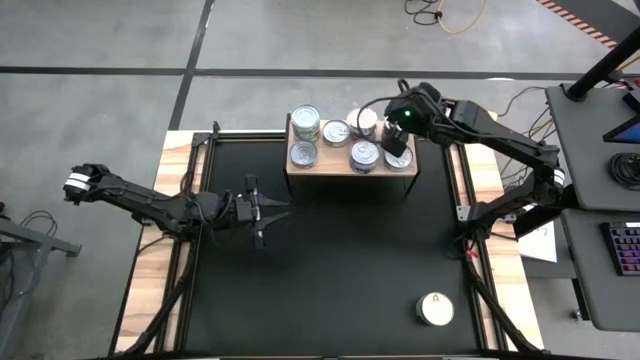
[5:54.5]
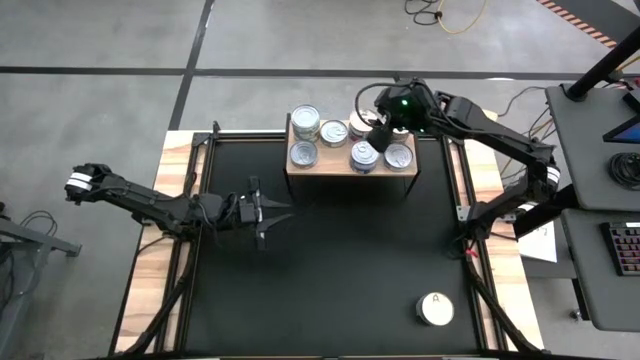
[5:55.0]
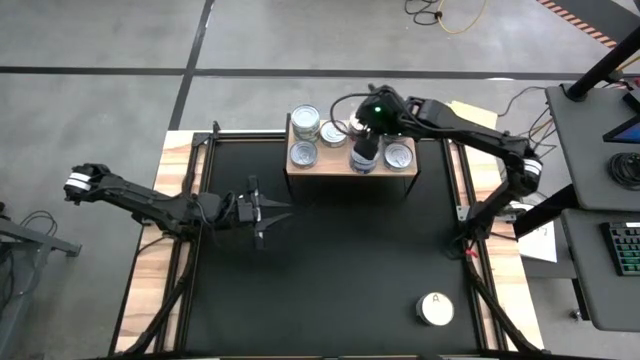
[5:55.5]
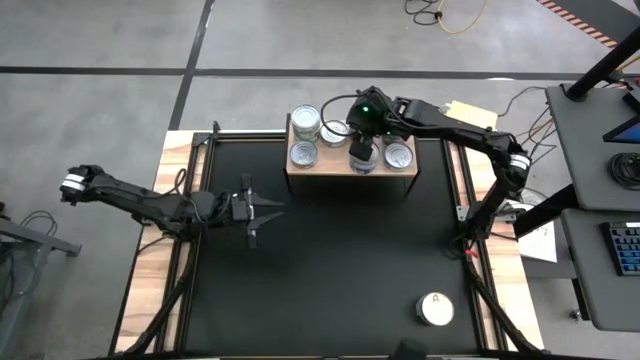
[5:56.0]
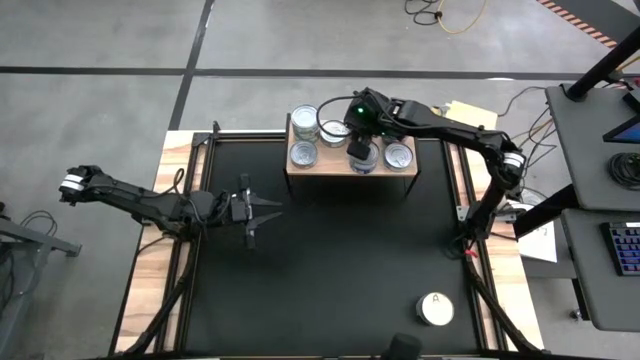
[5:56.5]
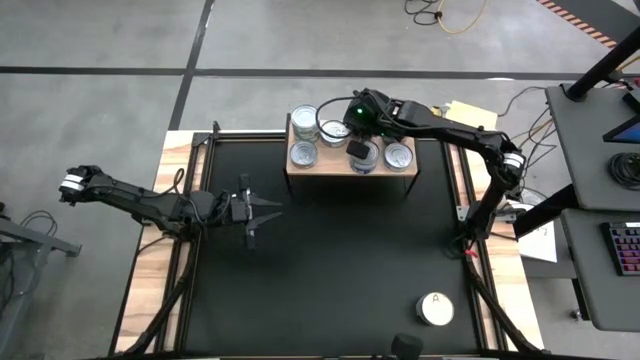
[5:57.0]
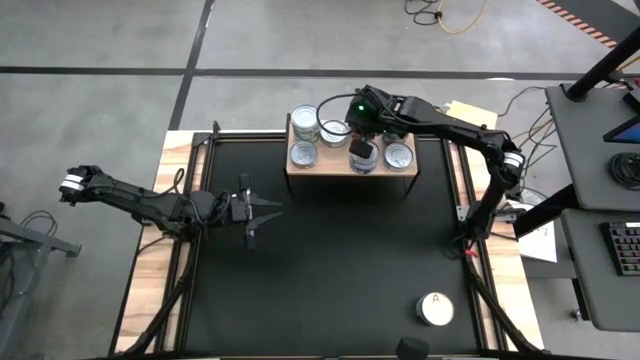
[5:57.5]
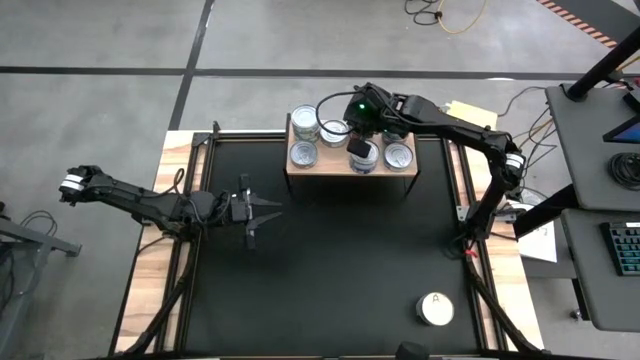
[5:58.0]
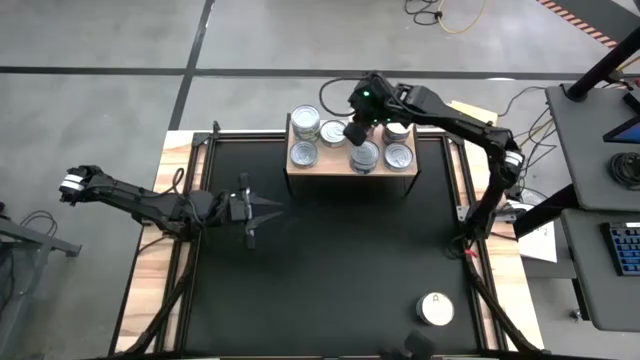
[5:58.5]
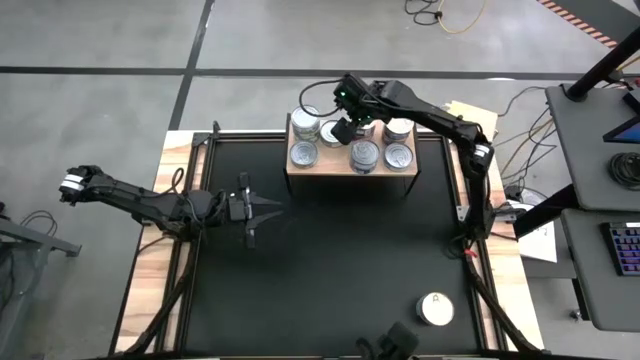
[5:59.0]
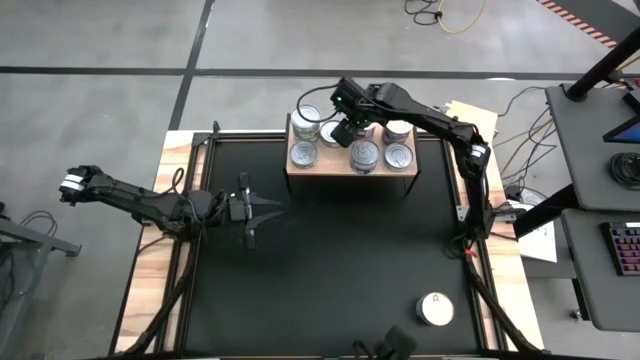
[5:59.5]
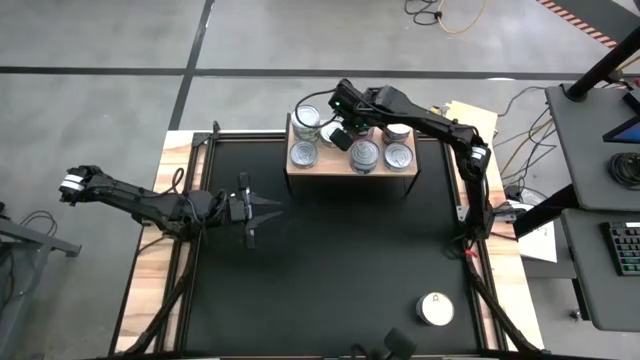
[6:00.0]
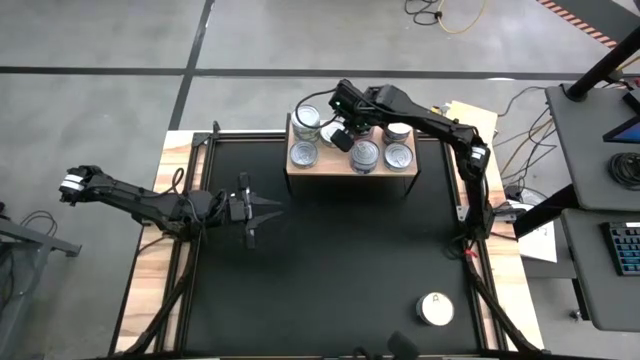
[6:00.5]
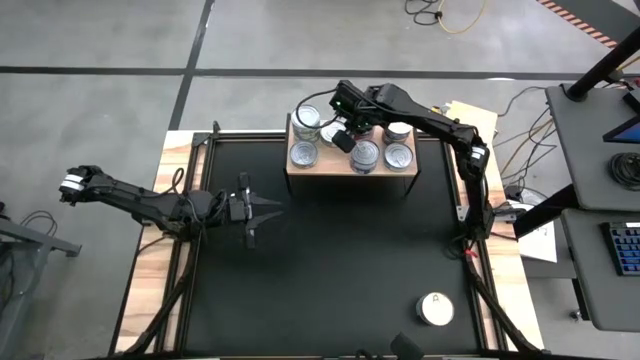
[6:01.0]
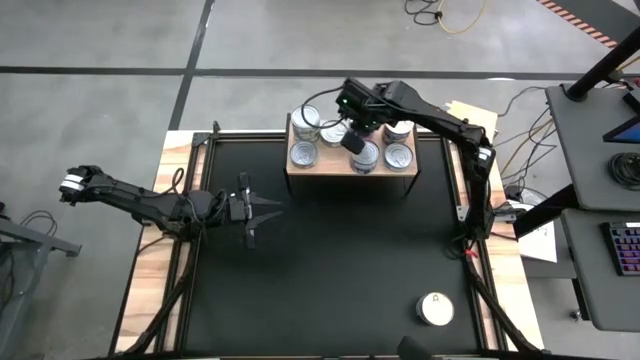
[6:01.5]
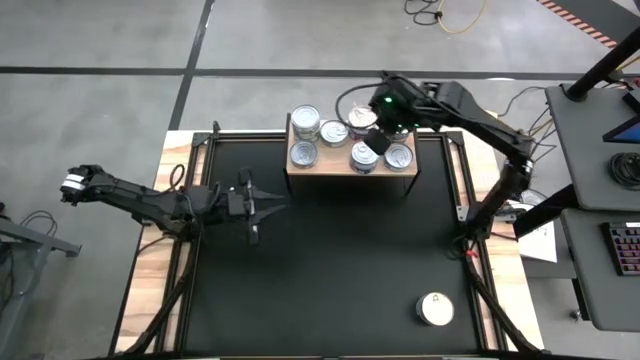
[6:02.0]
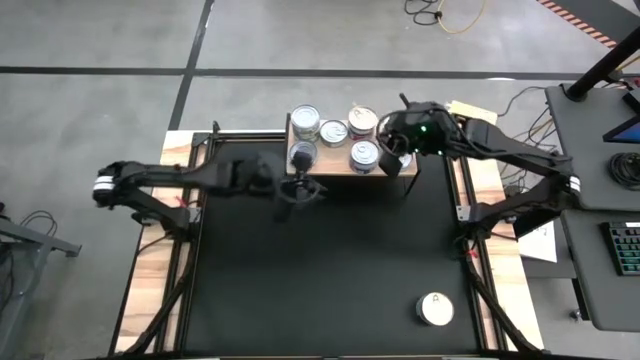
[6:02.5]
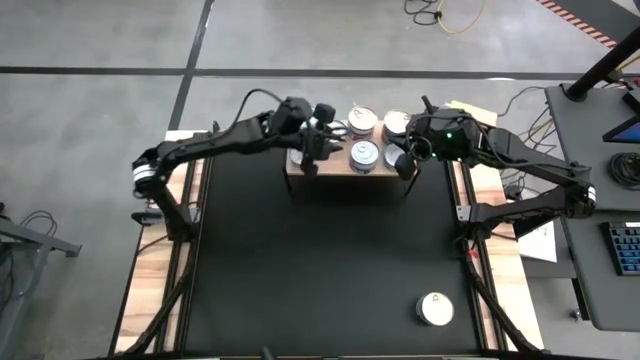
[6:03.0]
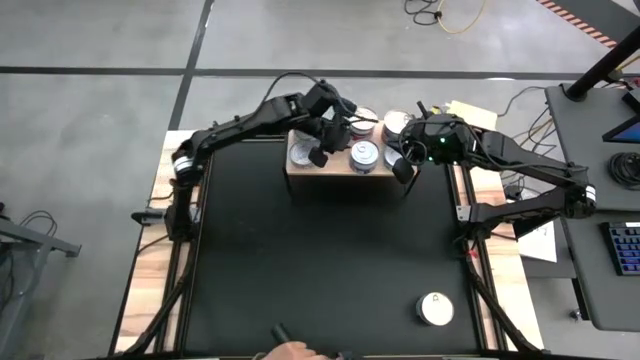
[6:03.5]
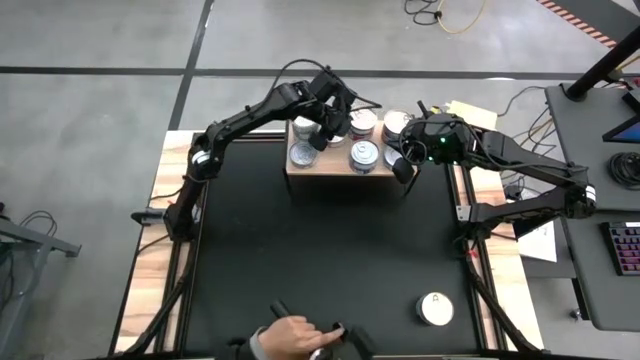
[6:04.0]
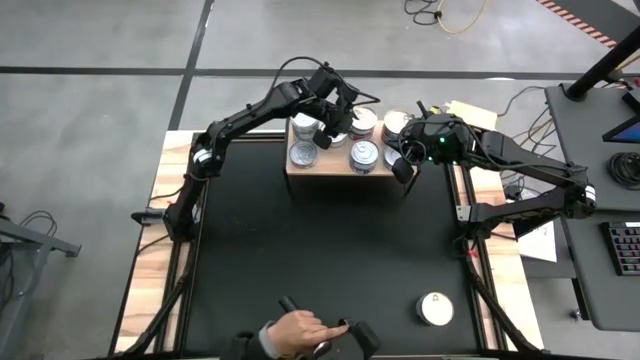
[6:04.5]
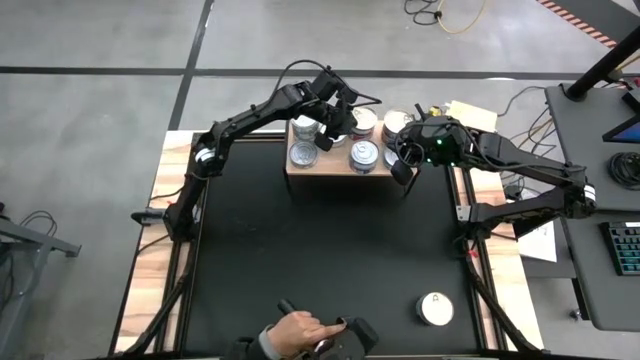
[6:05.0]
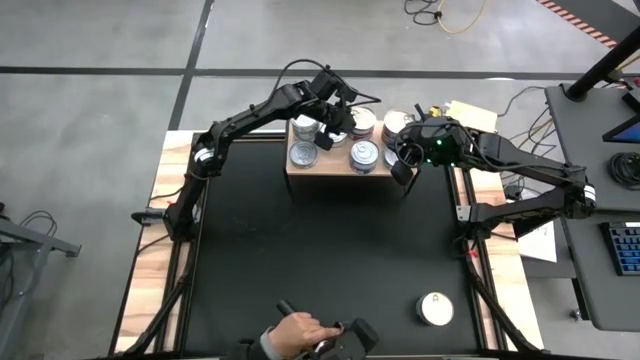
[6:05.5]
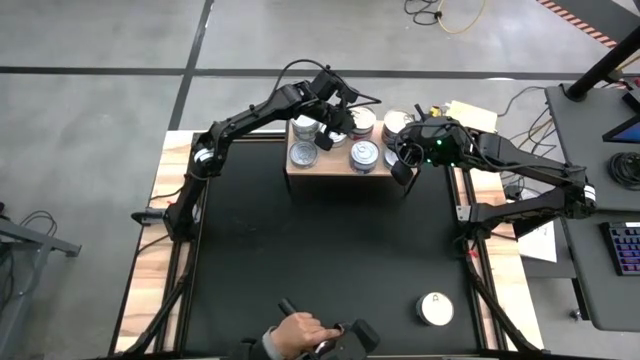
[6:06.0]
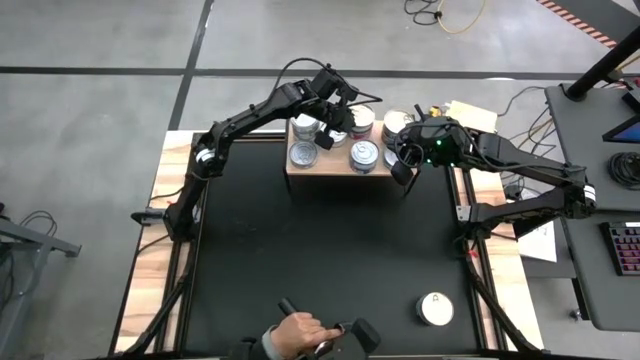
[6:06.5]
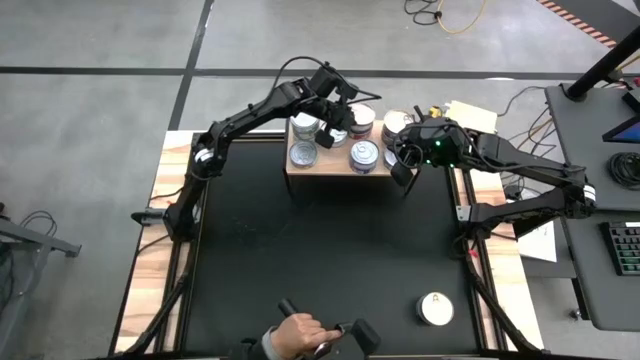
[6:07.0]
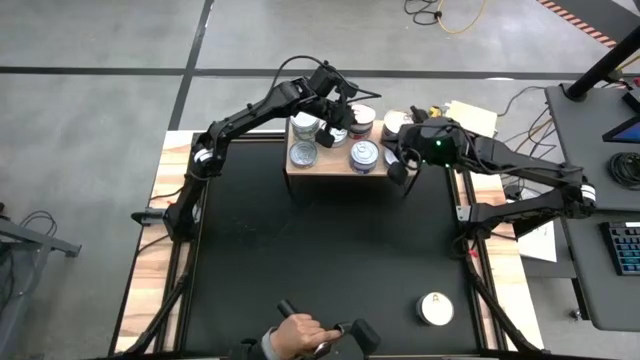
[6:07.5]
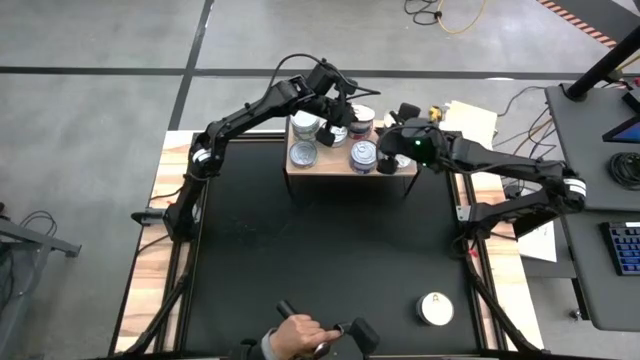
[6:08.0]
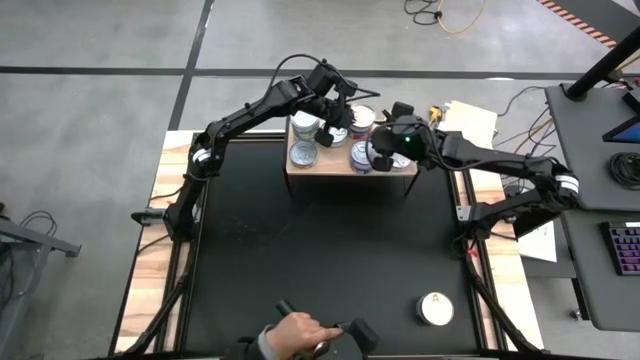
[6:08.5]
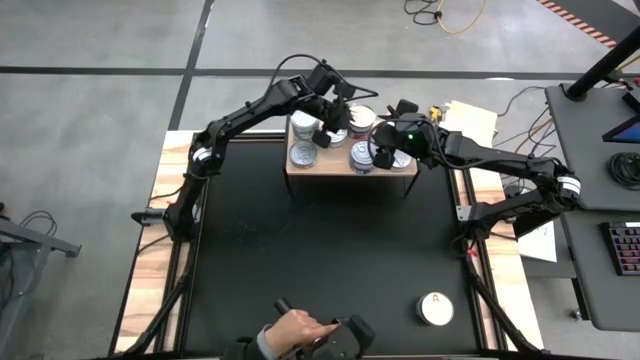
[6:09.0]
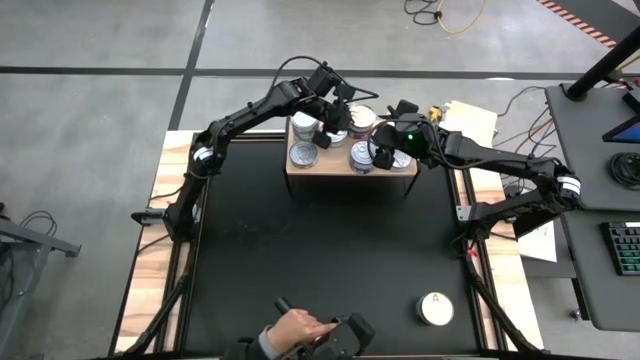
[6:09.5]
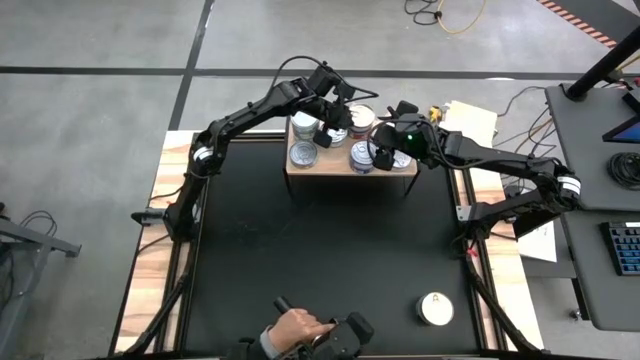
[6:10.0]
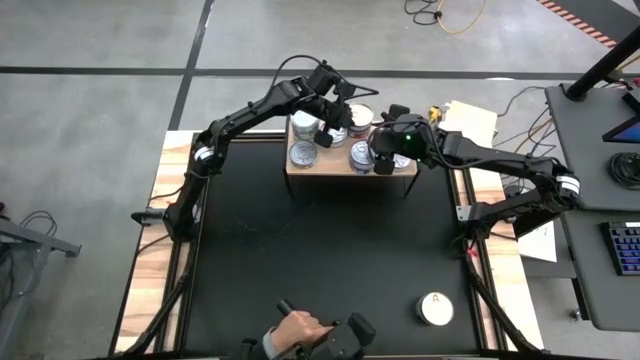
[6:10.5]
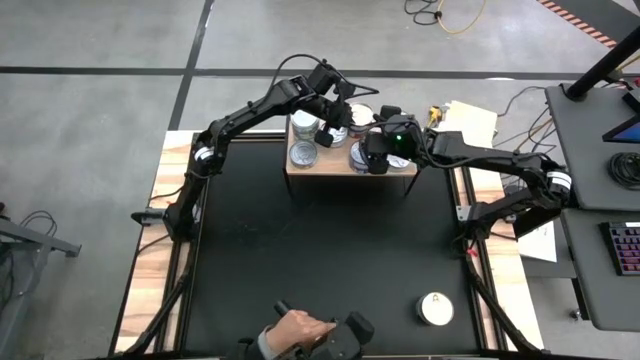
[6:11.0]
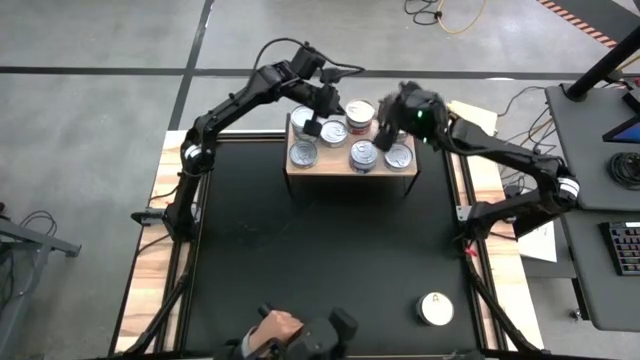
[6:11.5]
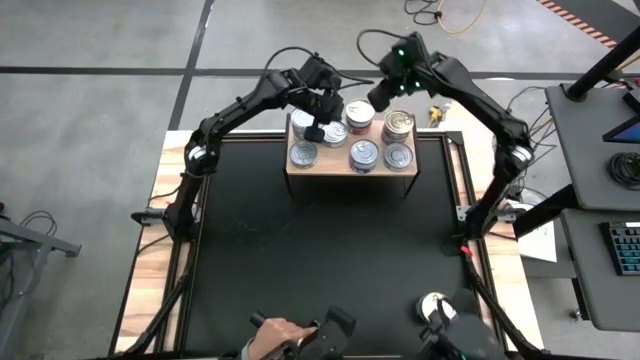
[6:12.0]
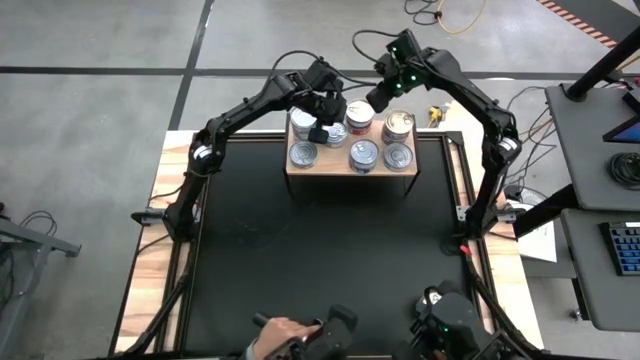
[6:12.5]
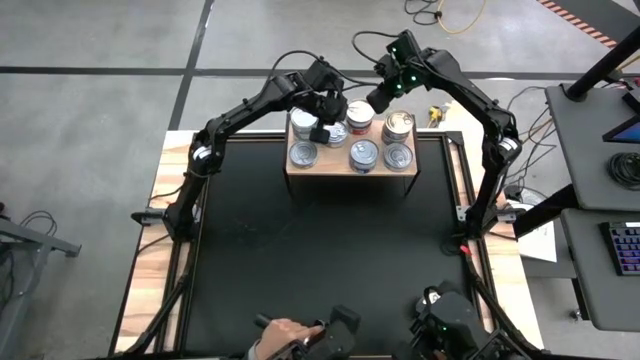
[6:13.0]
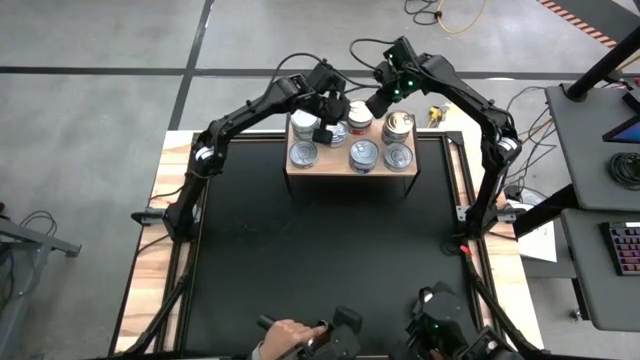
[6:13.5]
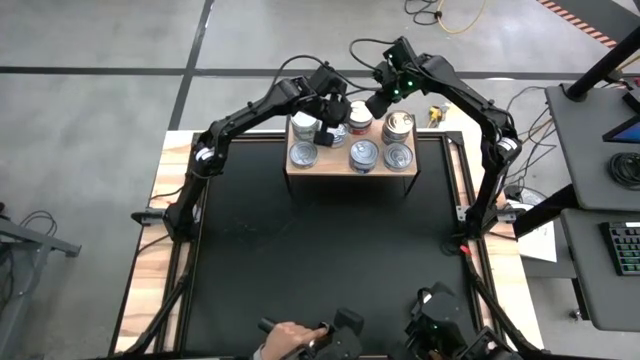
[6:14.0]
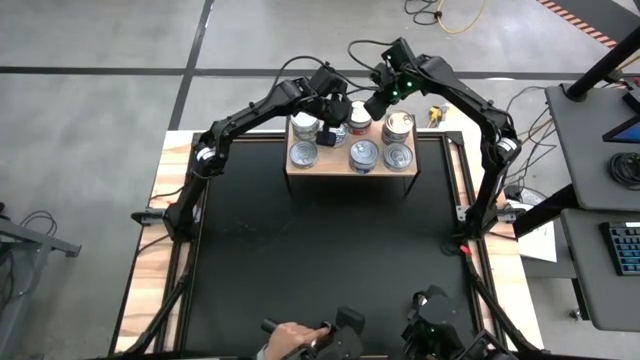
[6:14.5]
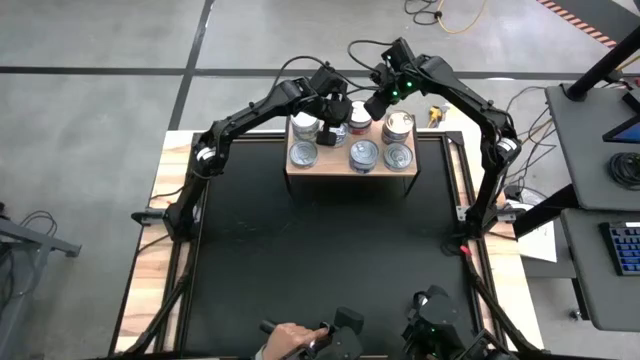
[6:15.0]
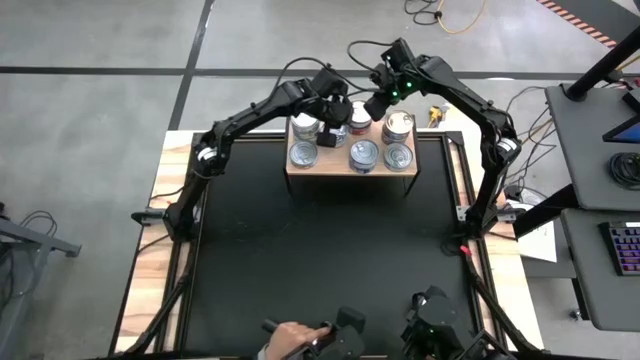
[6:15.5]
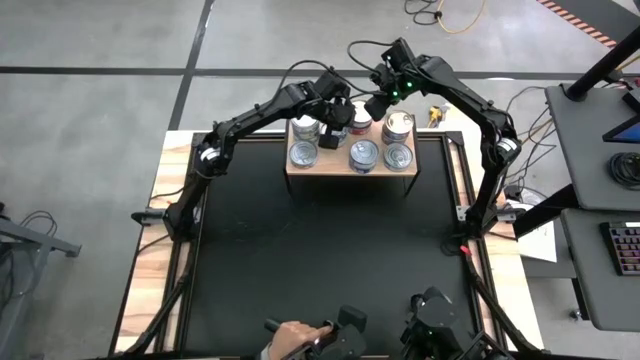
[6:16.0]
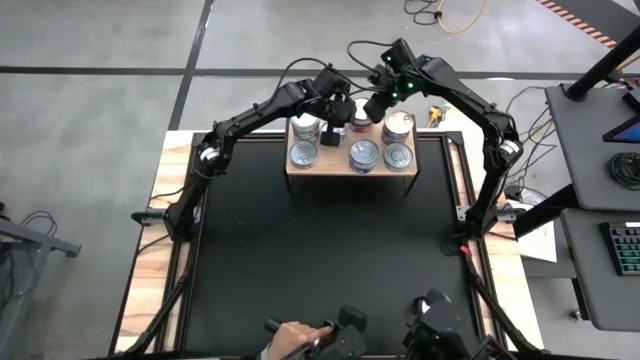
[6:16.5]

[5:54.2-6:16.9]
Task: Stack canned seafood by type on shelf
Stack the blue pink tuna can on top of the blue pink tuna can on the shelf
